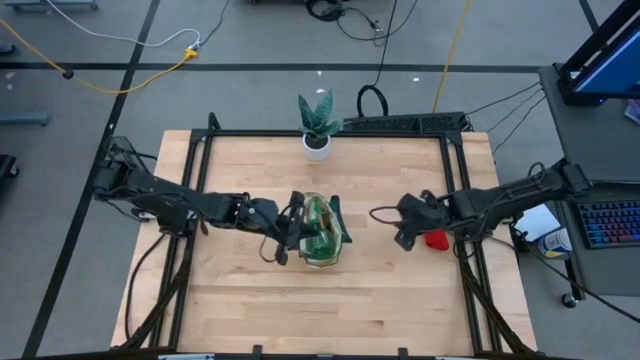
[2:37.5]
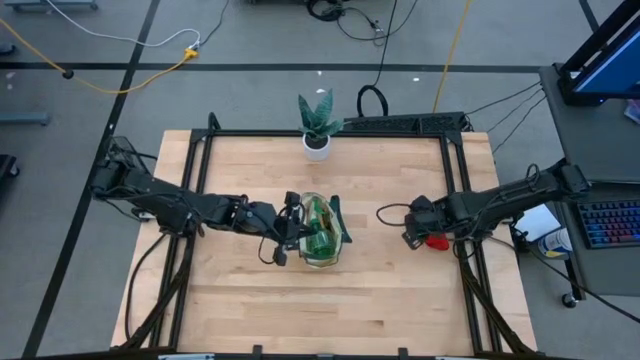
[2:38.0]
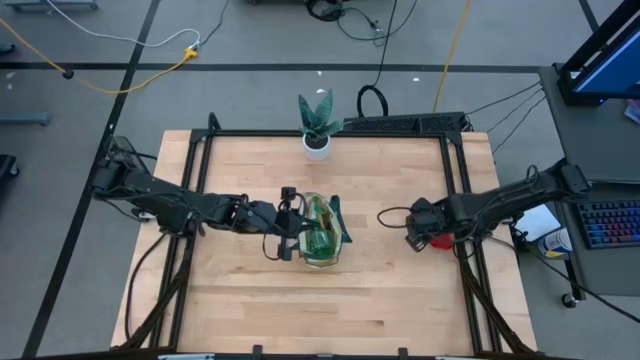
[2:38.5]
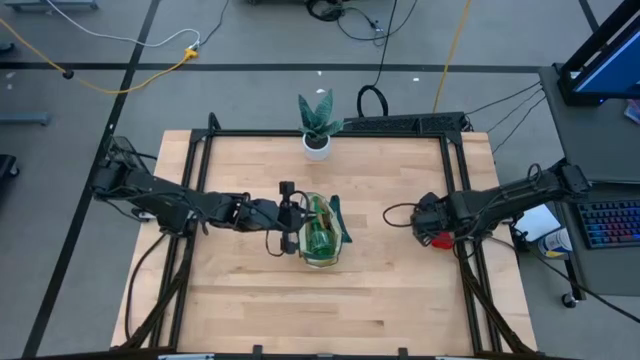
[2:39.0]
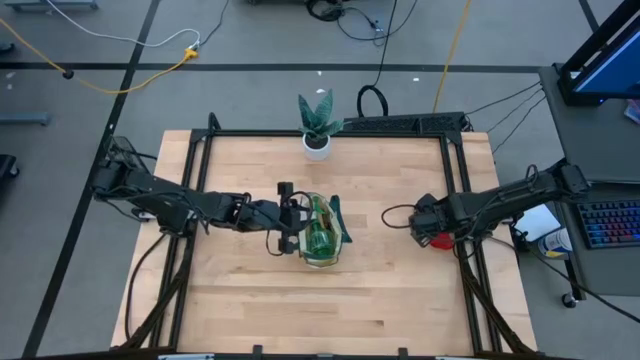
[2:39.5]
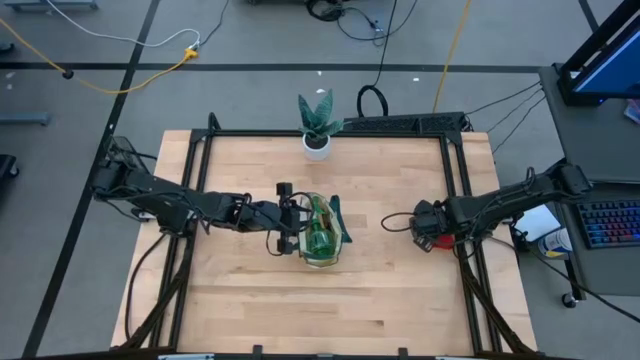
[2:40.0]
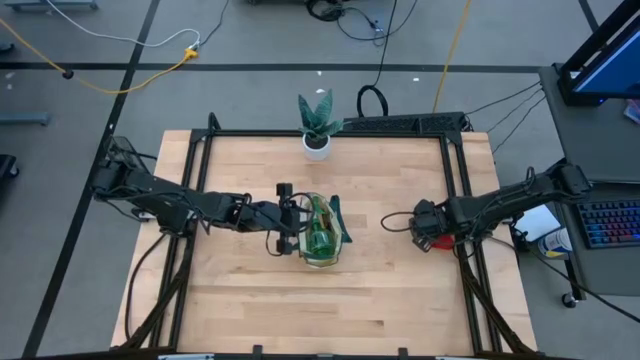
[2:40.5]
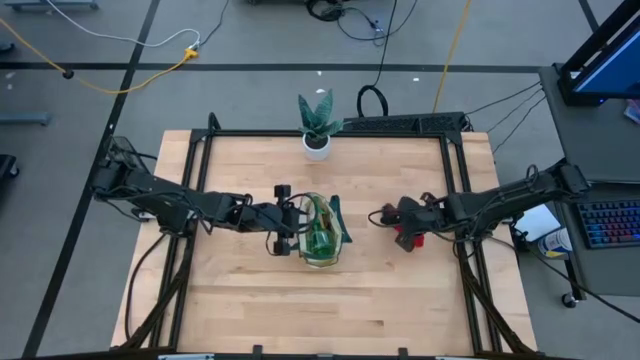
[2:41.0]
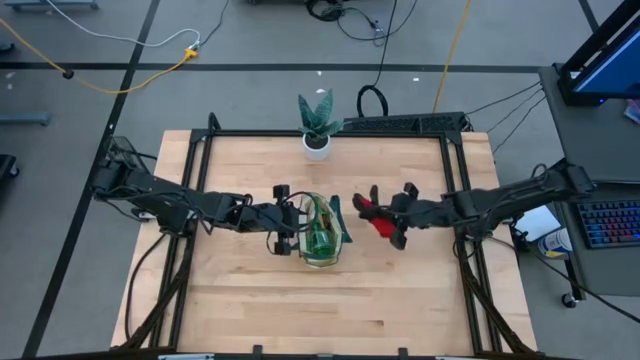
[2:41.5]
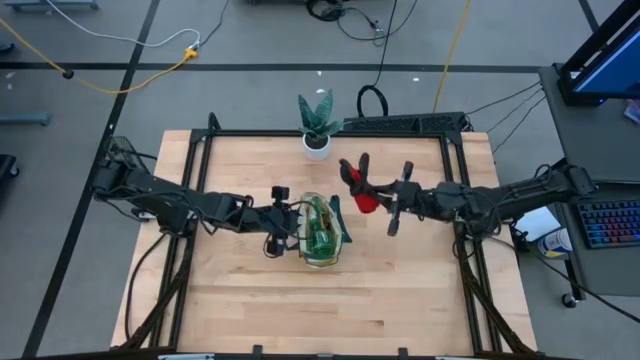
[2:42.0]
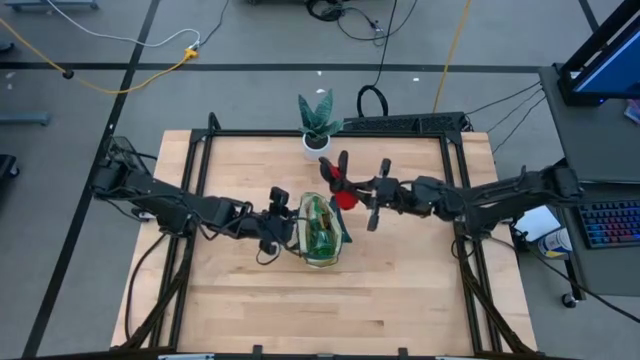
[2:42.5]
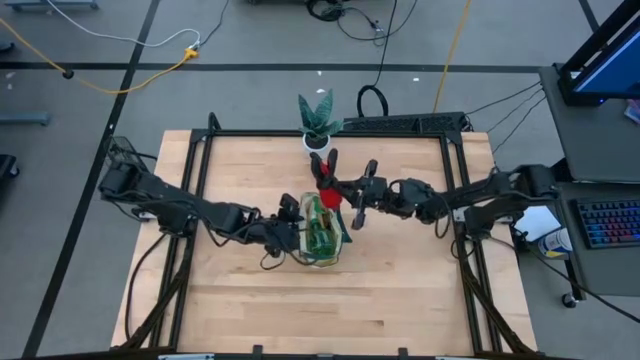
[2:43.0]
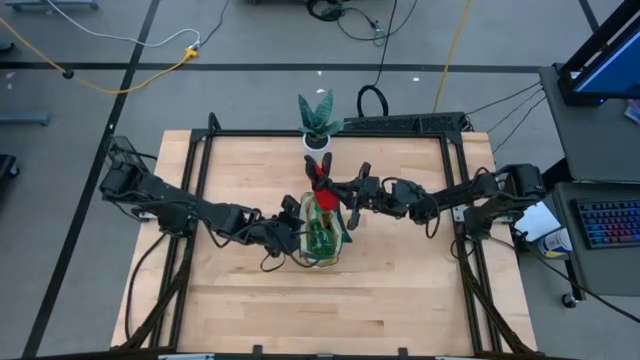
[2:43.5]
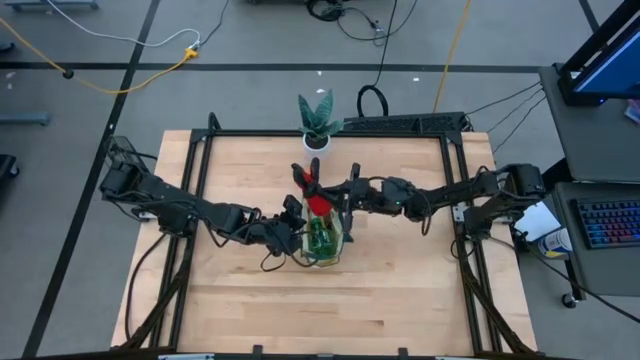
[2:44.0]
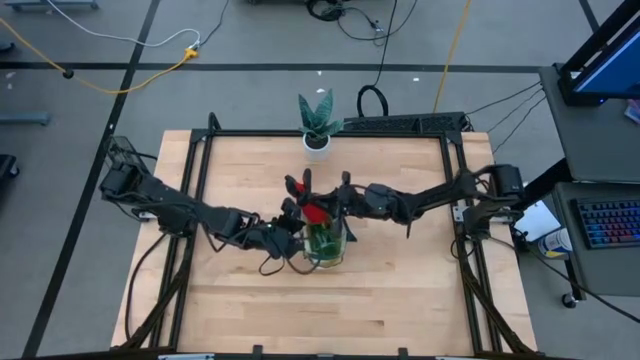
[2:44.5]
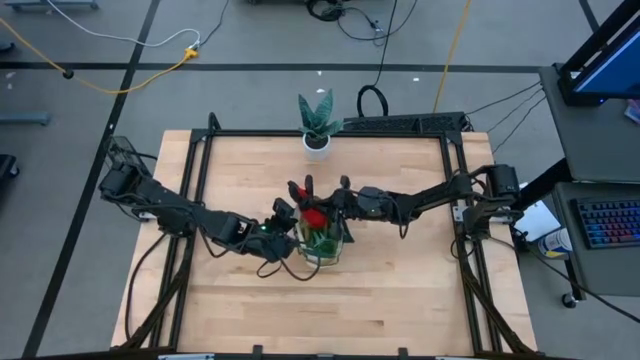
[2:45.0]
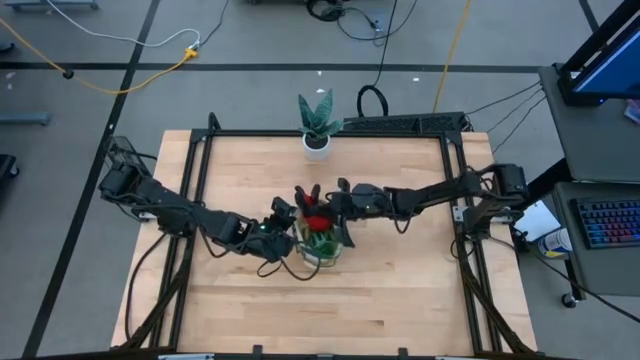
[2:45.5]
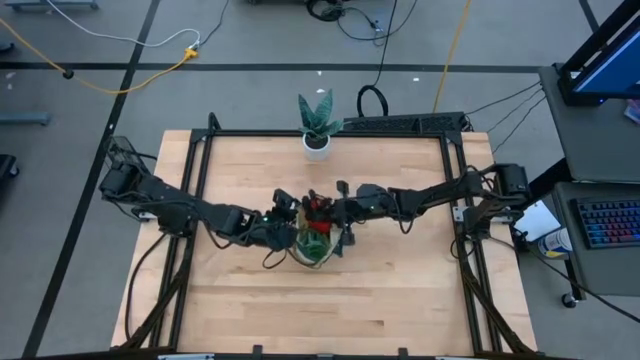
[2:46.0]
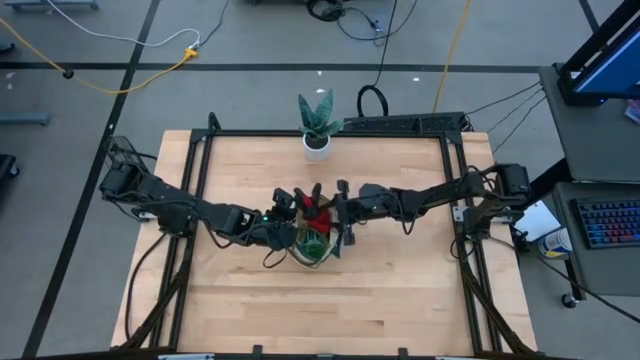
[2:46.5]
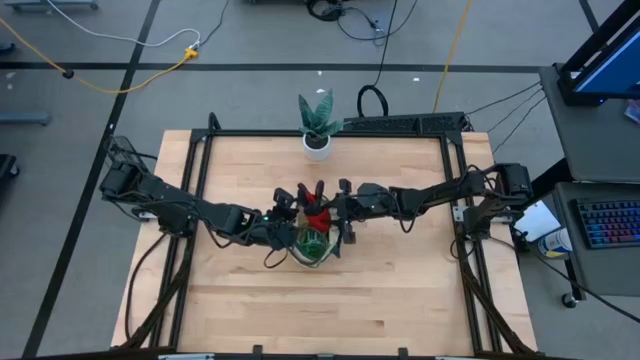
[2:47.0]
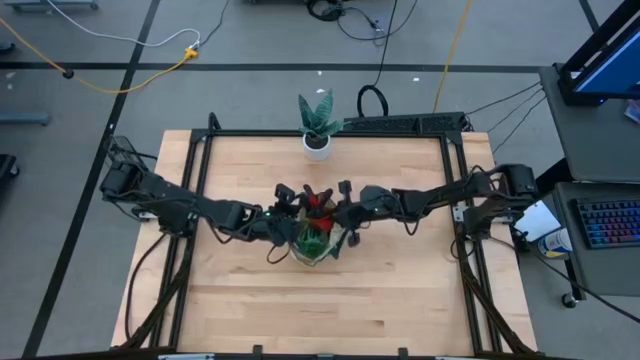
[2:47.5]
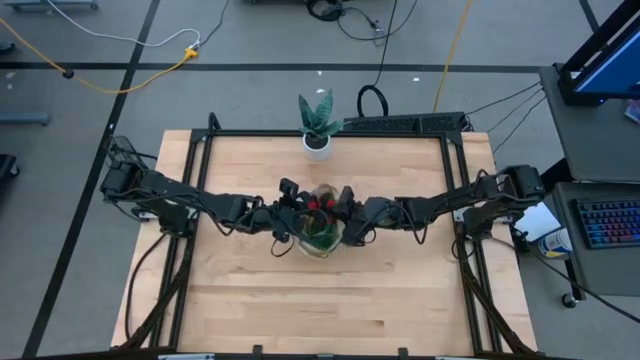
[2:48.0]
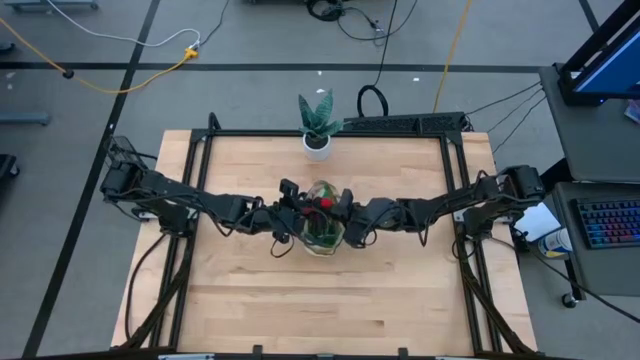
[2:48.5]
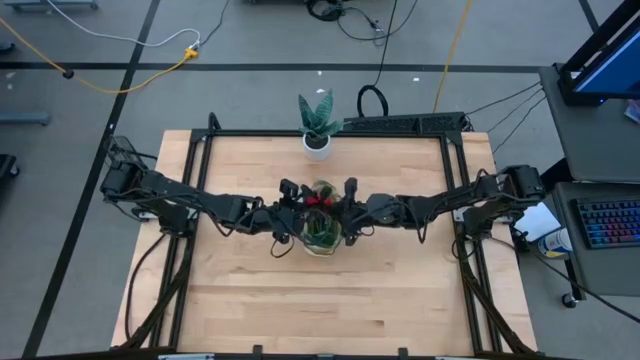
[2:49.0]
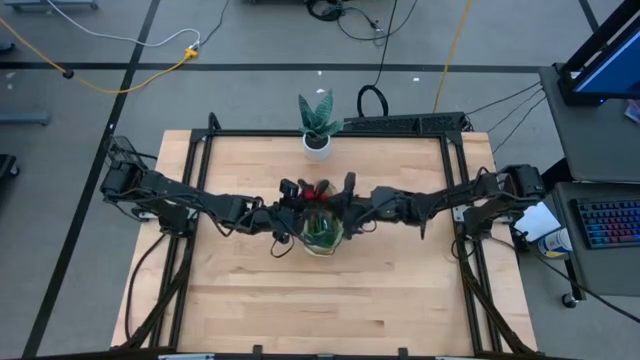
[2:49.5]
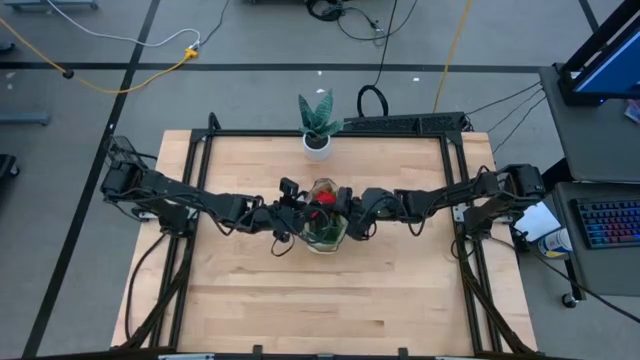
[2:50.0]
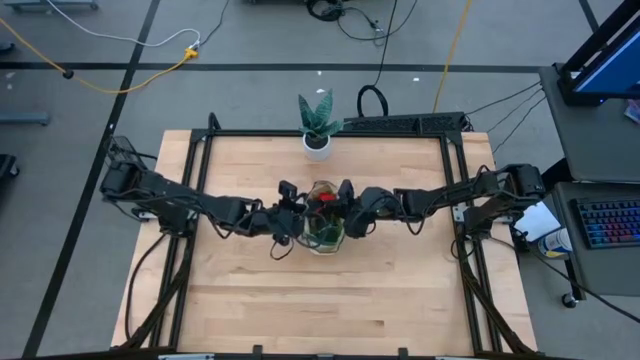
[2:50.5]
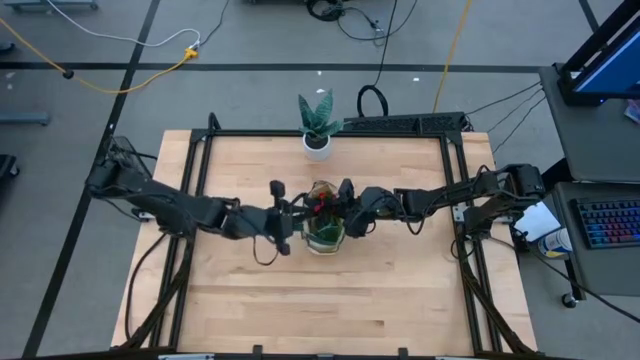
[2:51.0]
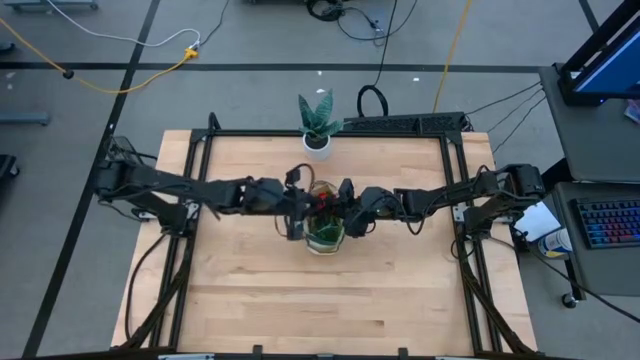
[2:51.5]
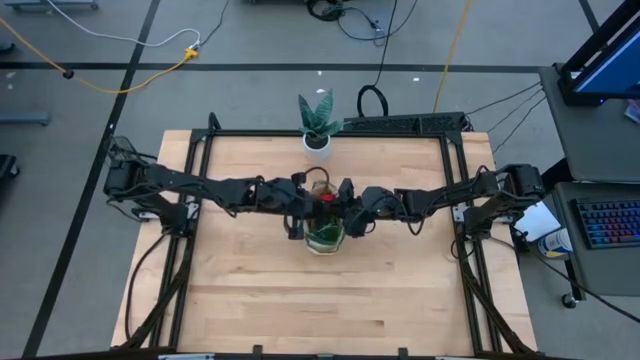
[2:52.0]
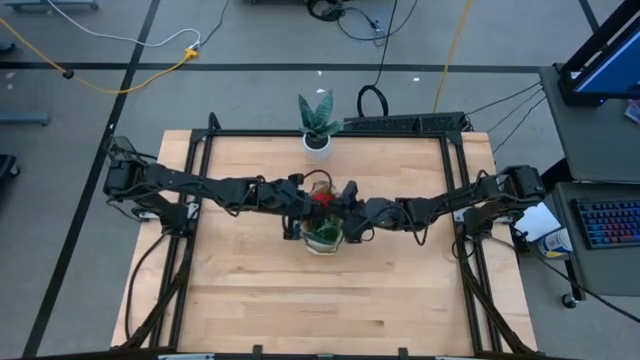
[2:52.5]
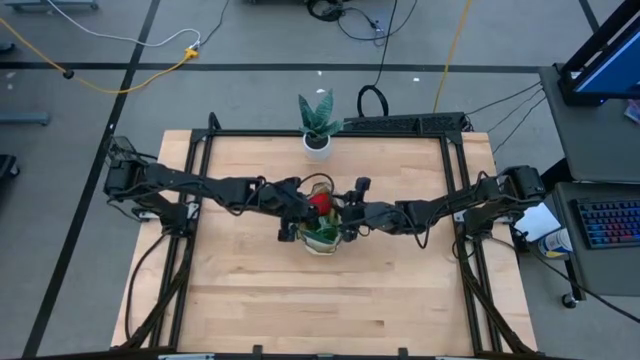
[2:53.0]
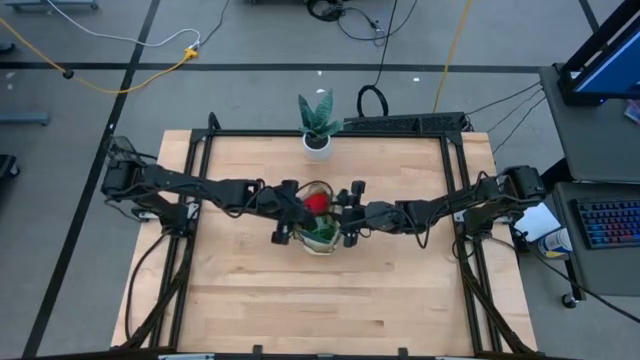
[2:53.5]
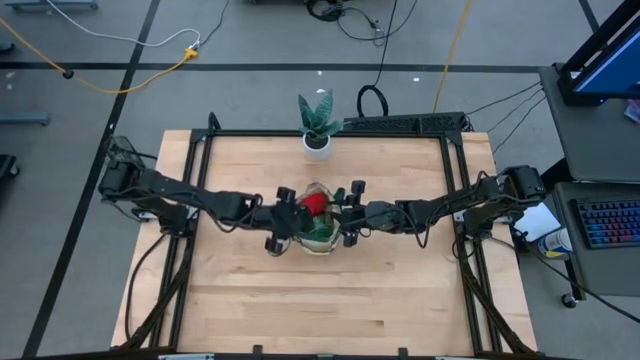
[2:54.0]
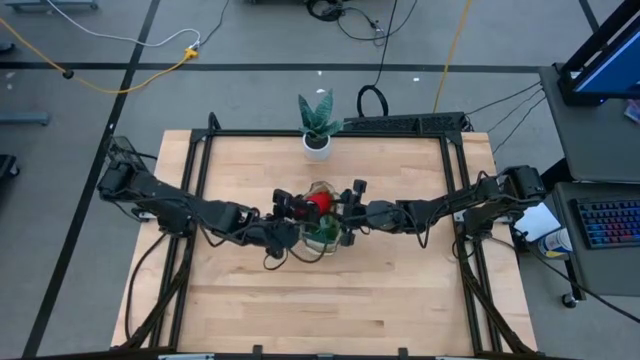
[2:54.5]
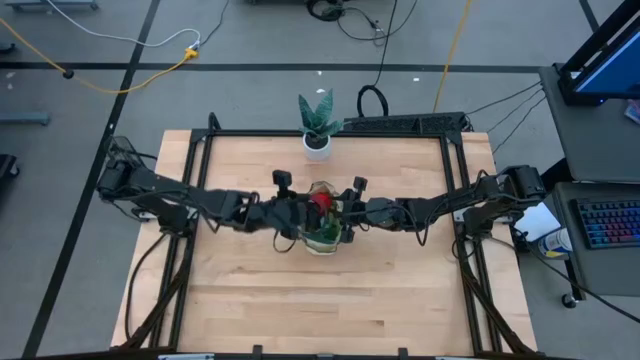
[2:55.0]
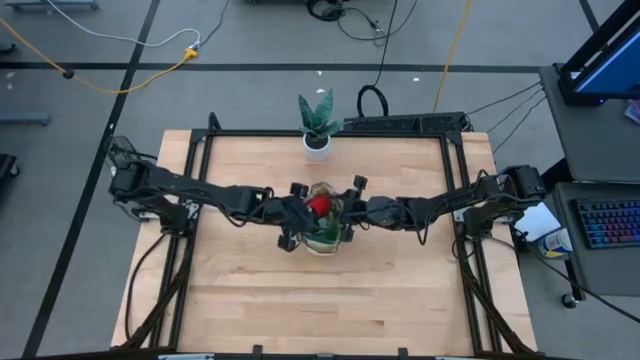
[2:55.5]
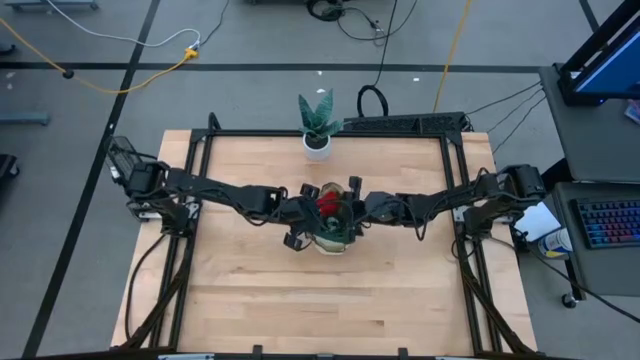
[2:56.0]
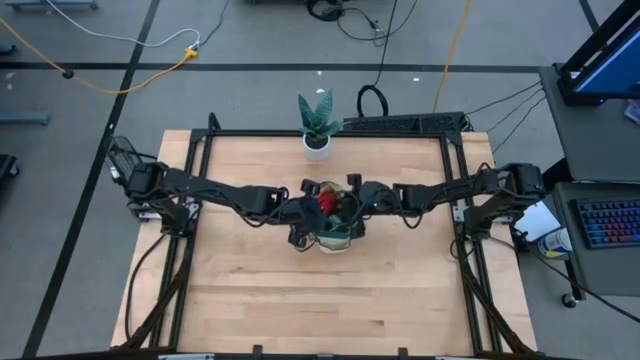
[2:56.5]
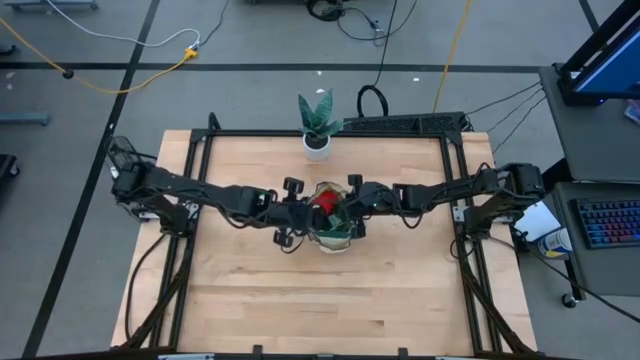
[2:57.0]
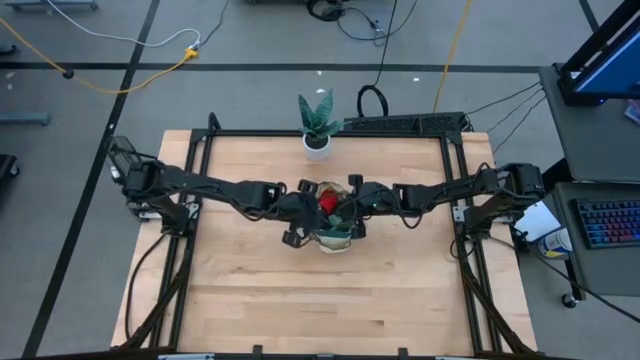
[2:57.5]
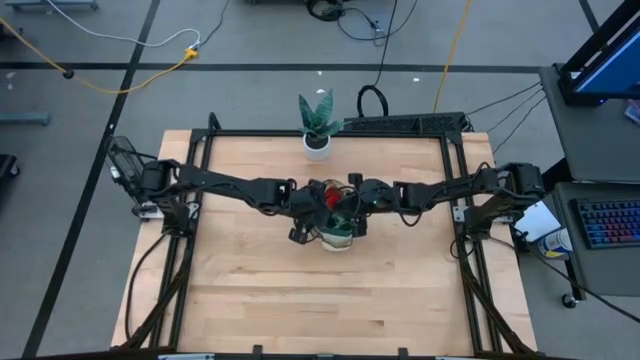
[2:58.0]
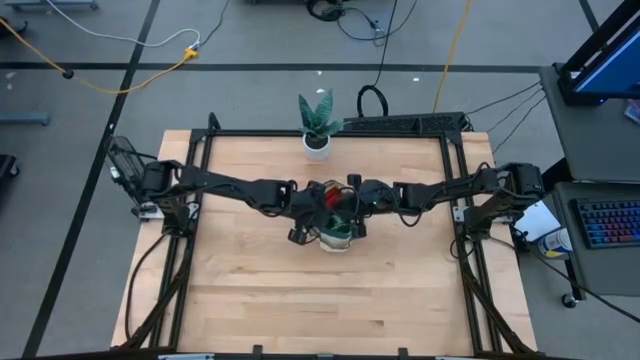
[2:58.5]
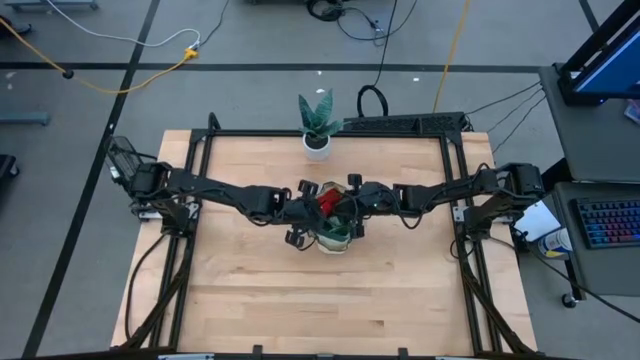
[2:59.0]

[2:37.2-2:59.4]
Task: Pick & Place Garden tools in Gardening bag
Put the red gloves into the gardening bag
